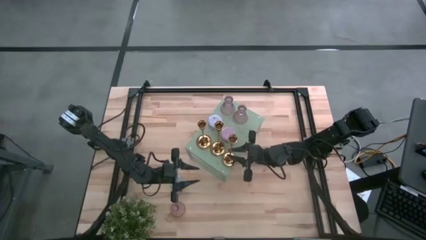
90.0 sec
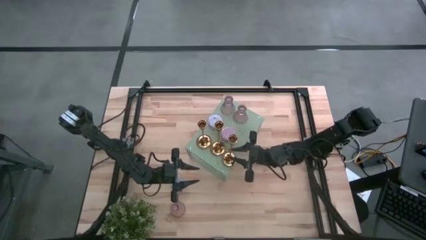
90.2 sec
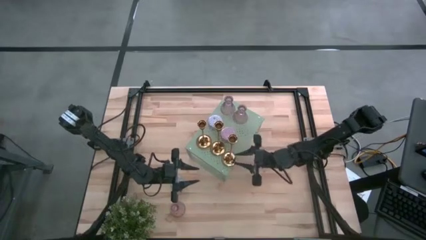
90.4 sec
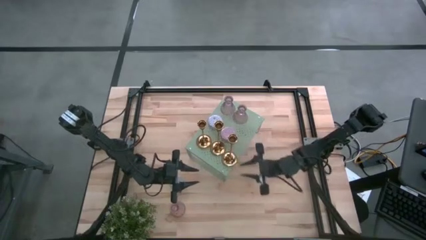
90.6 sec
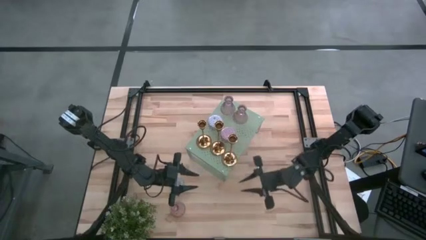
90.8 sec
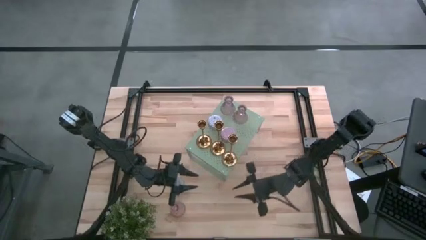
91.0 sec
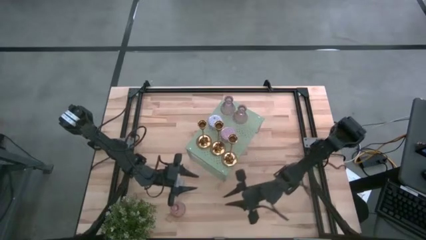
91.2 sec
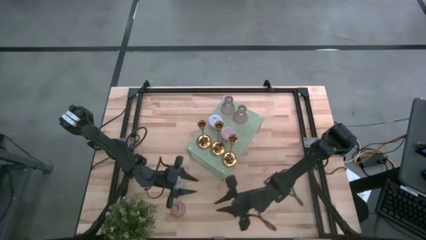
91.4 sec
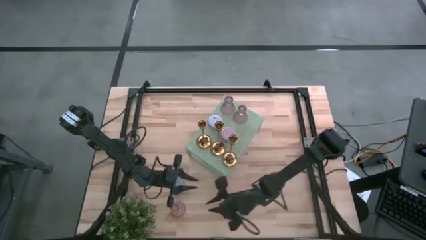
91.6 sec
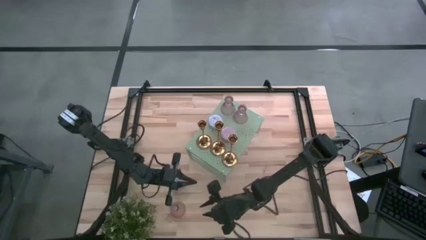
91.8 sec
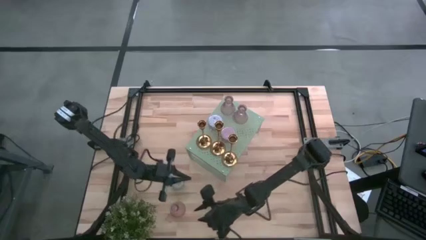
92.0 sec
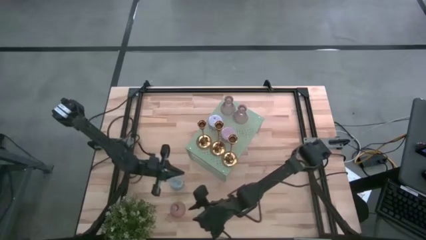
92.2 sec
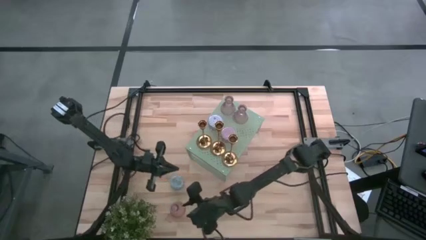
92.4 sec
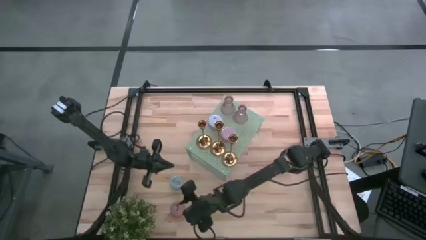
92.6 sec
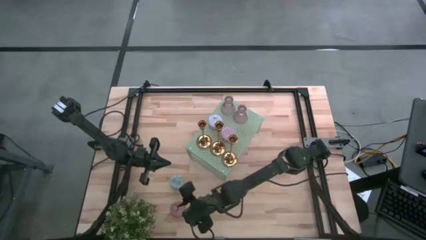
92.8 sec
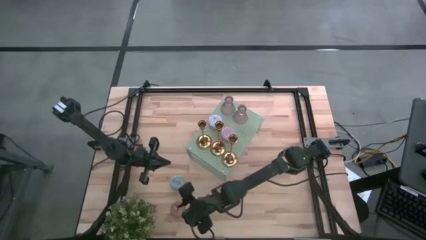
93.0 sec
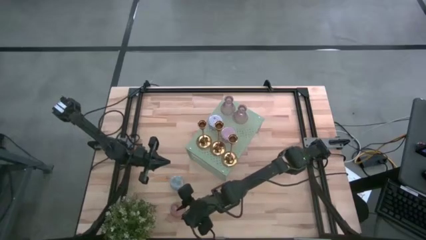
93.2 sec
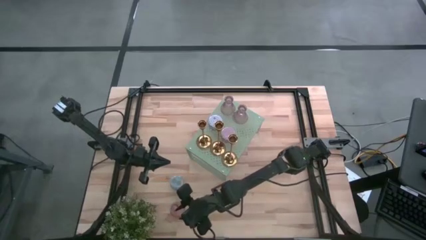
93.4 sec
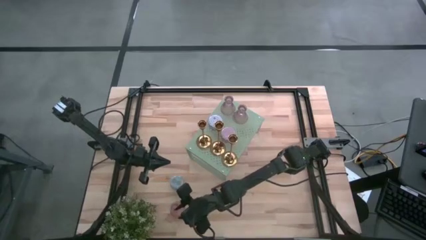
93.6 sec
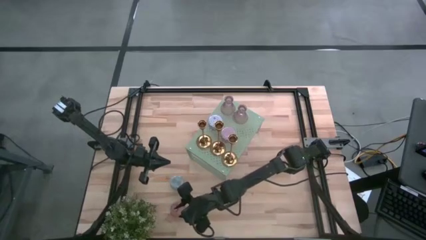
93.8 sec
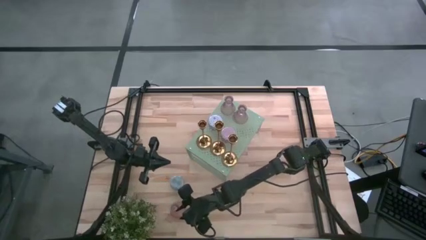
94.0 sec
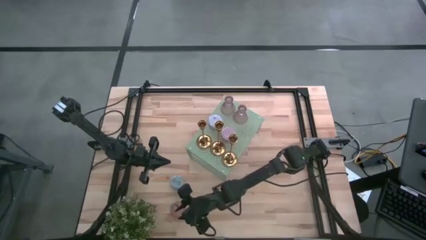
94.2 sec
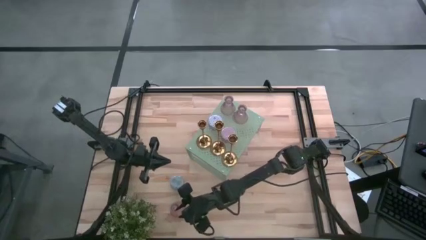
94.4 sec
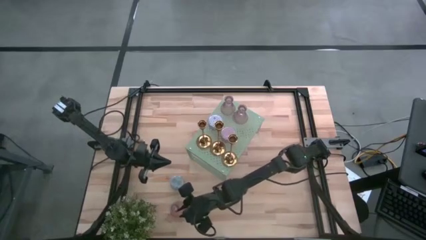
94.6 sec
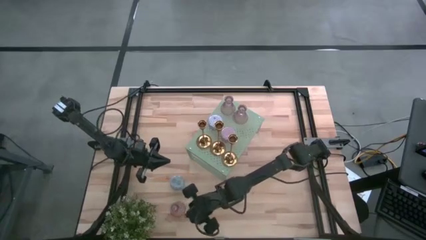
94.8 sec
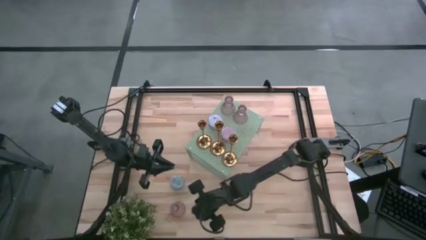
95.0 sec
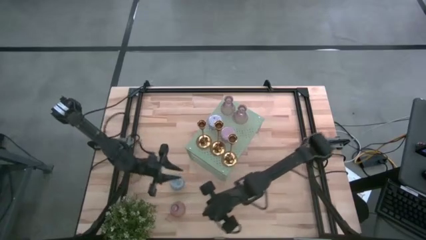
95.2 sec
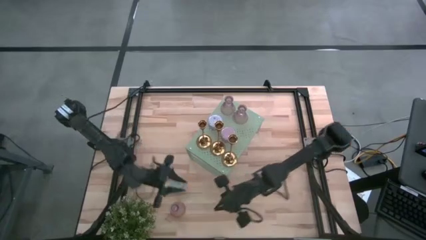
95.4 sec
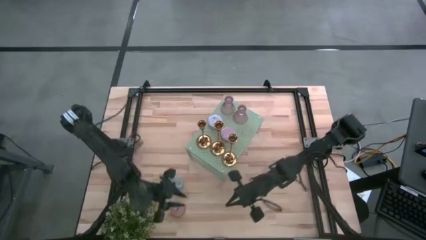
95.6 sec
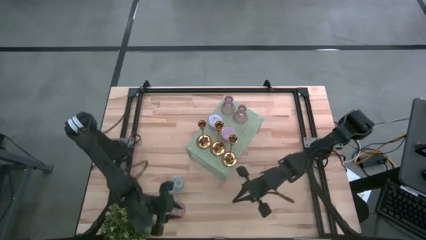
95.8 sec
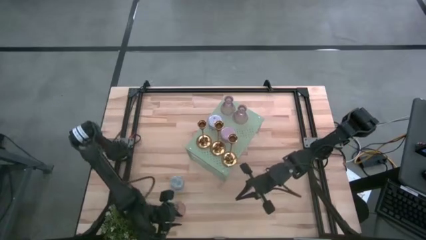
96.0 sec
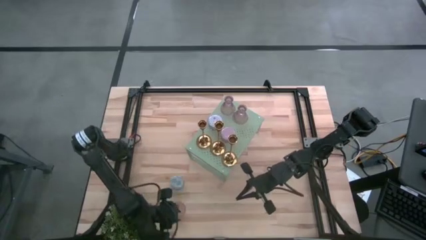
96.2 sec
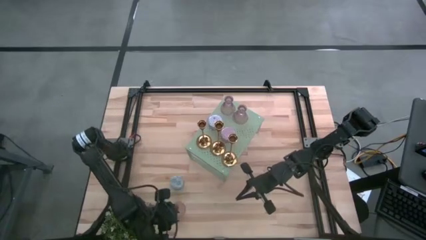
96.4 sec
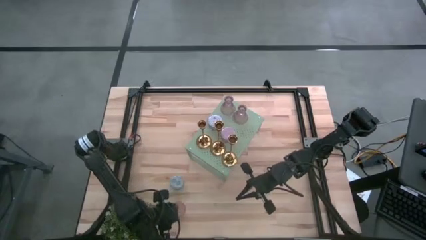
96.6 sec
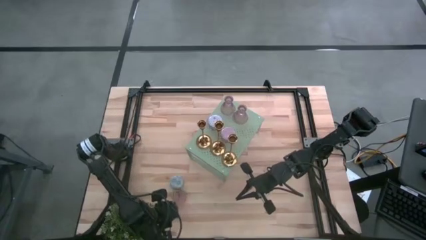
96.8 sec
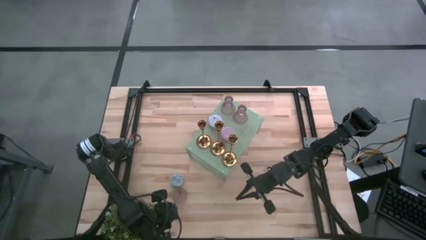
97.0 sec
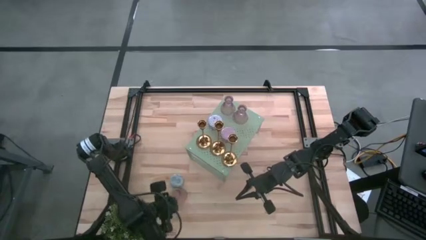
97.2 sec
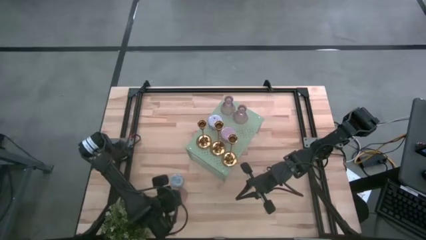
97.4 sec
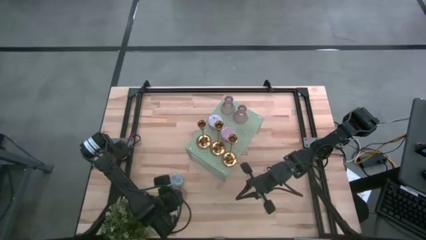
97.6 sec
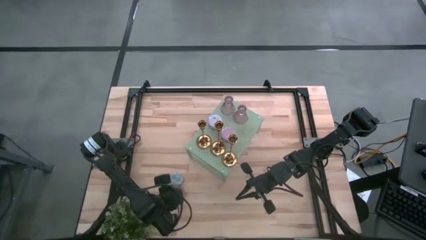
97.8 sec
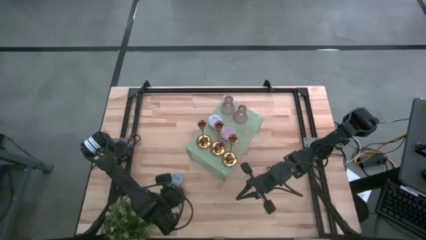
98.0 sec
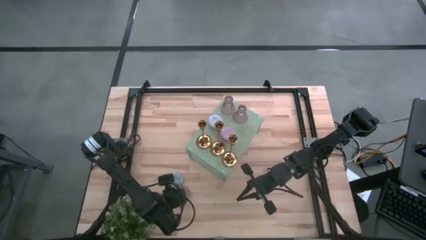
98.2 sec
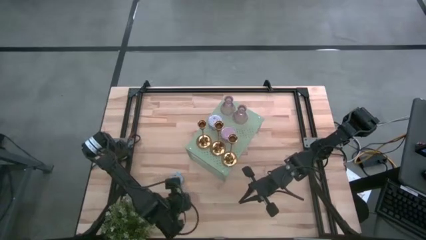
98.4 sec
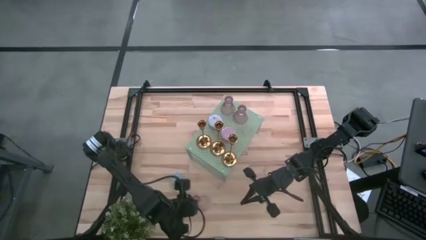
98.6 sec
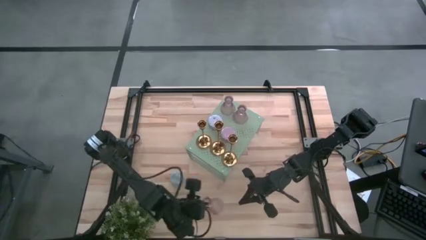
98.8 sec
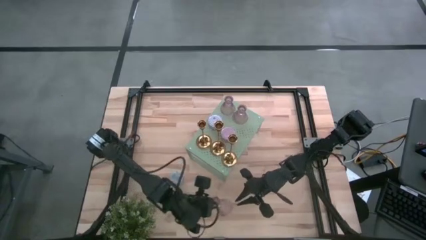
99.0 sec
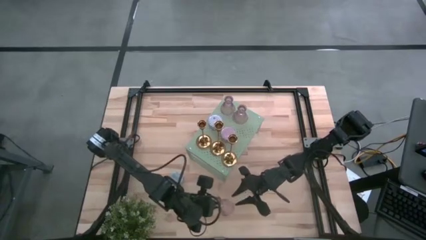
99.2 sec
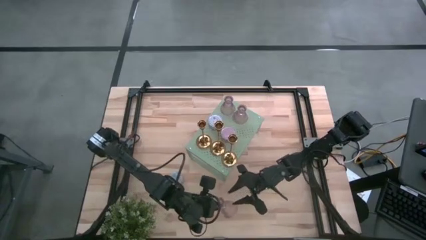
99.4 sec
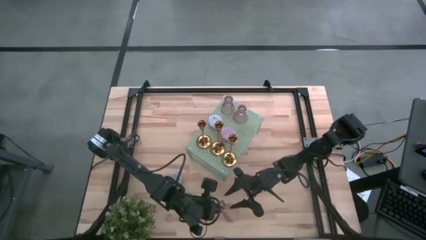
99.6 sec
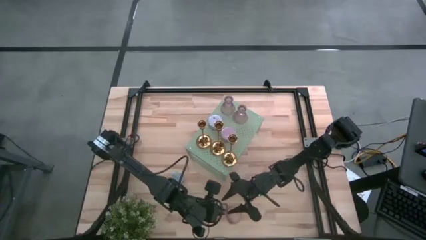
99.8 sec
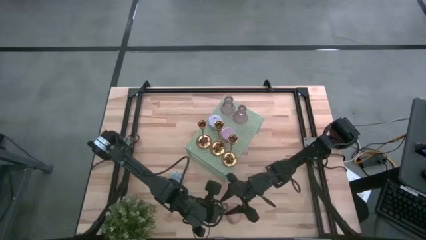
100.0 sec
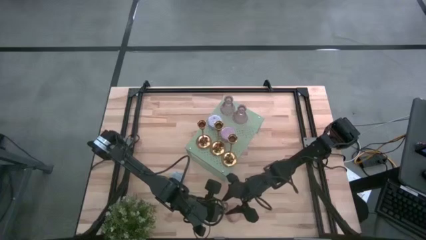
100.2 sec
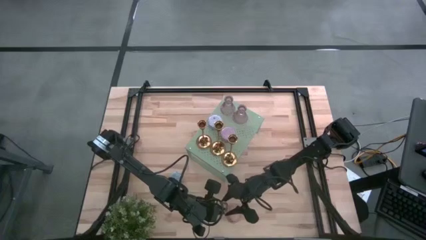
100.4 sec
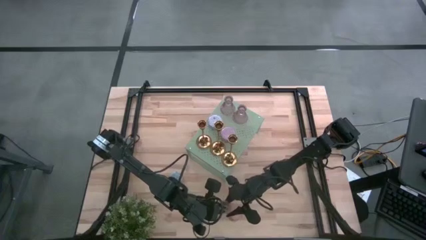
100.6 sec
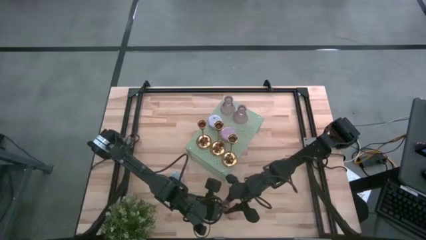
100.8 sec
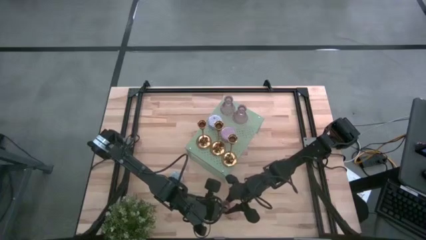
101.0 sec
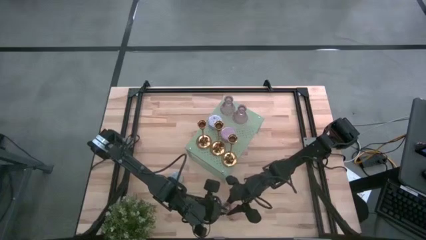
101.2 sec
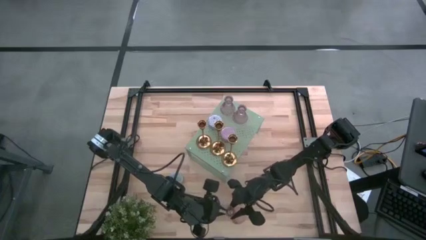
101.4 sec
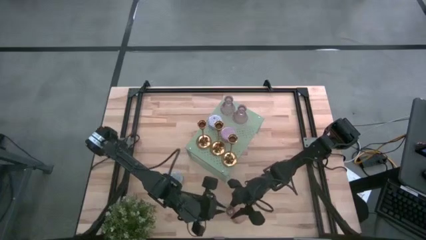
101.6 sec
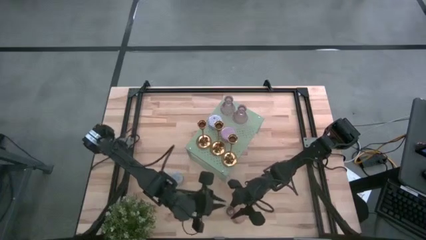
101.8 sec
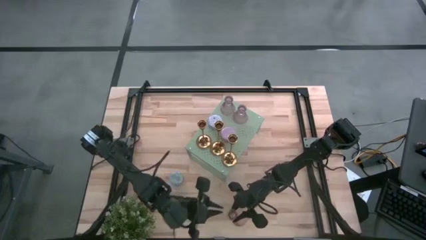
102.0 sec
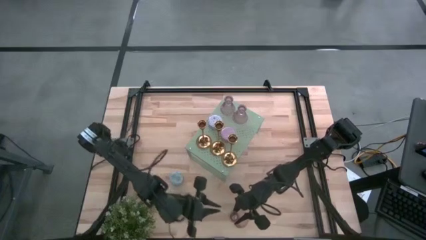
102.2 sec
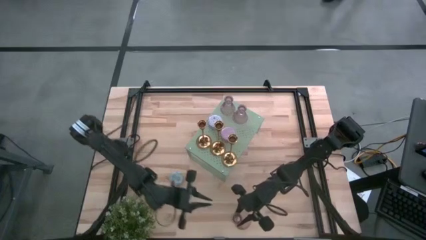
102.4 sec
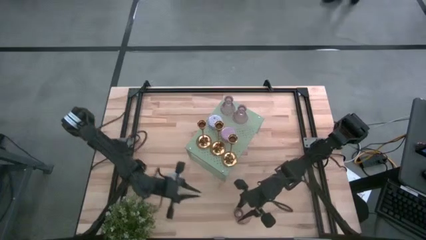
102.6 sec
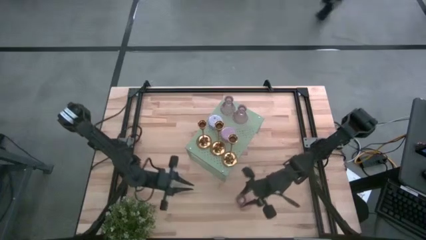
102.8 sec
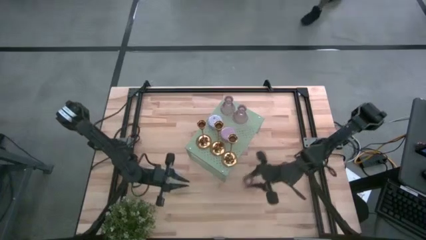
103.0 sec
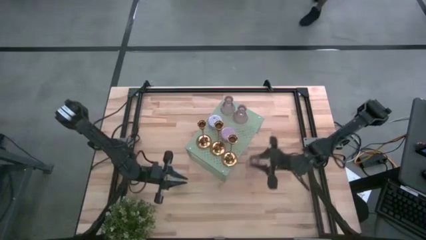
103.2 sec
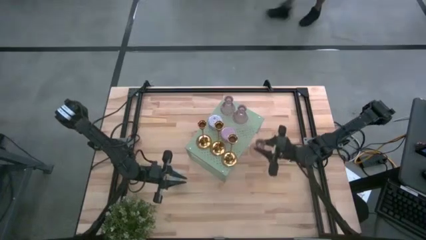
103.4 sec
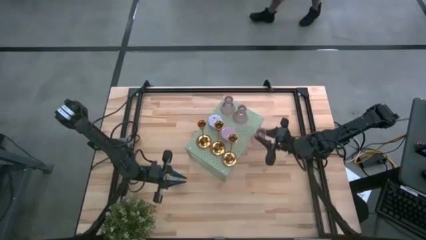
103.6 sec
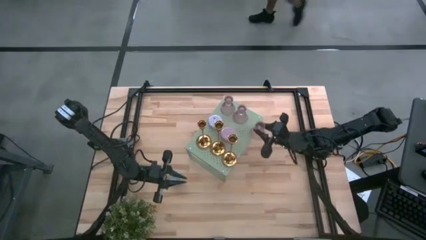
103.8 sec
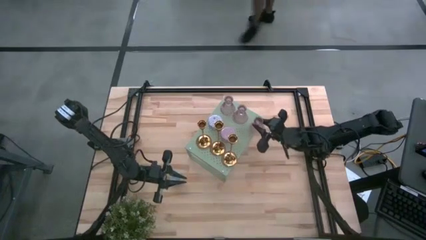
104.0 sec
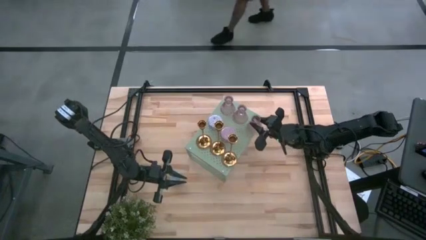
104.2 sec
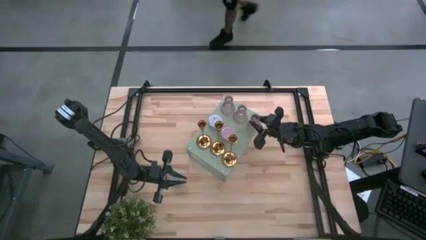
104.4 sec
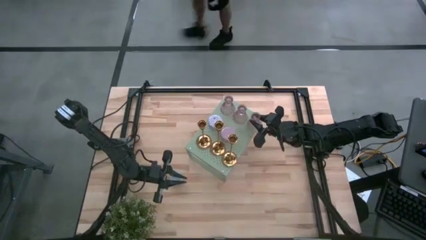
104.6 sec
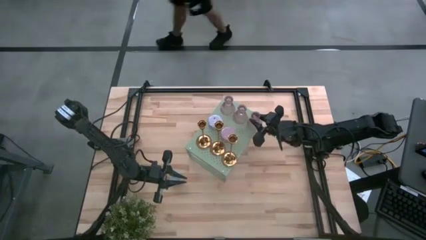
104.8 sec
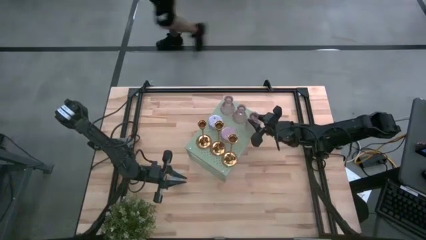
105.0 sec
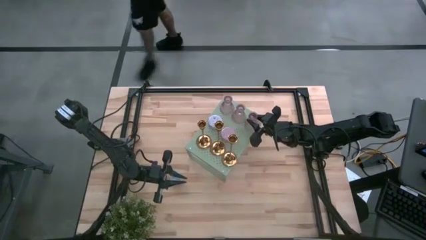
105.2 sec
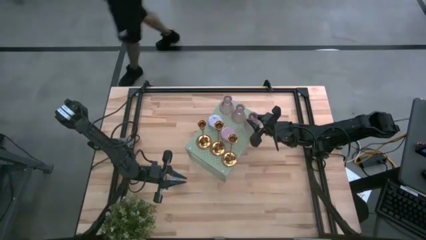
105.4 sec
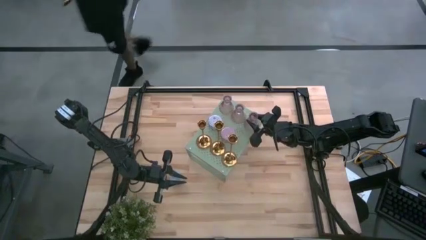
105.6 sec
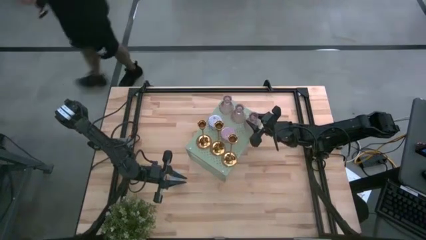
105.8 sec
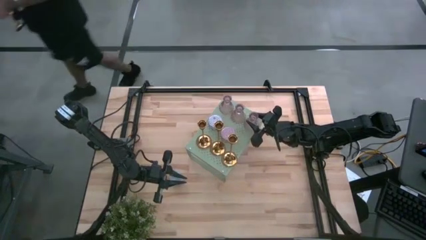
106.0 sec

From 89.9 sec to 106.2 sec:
Task: Pick & Place candle stick holders
Put the purple glass candle holder aligned with the other purple glass candle holders on the shelf
